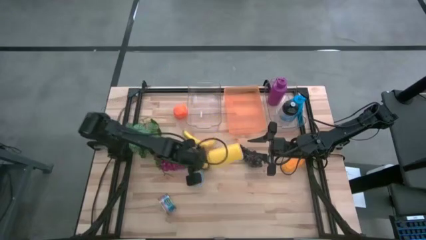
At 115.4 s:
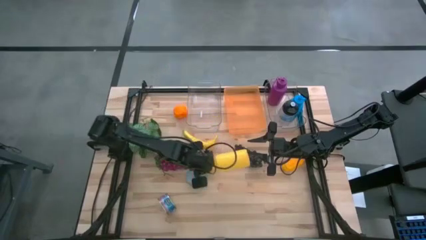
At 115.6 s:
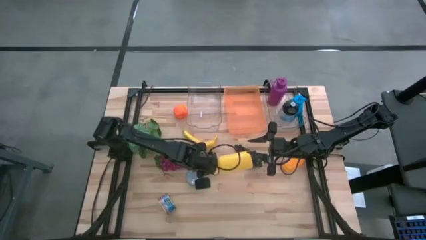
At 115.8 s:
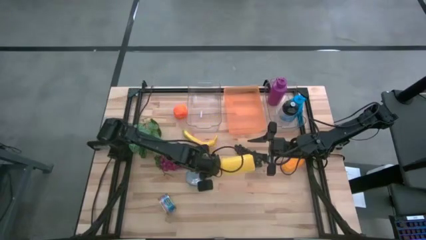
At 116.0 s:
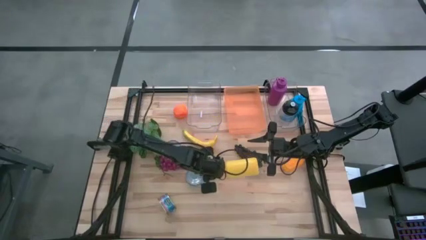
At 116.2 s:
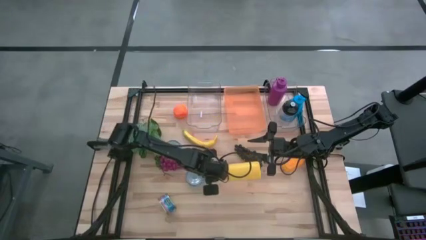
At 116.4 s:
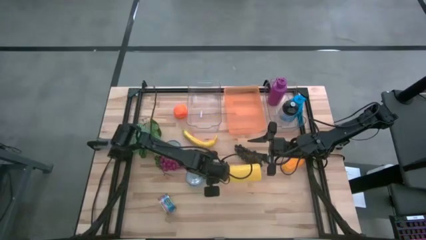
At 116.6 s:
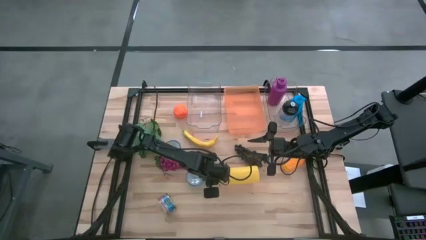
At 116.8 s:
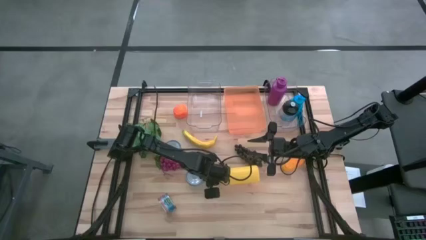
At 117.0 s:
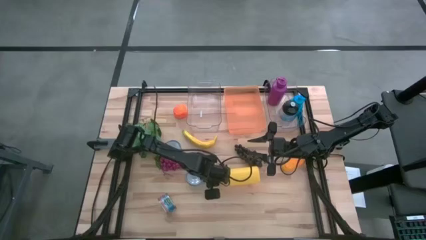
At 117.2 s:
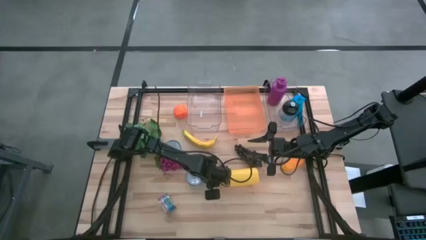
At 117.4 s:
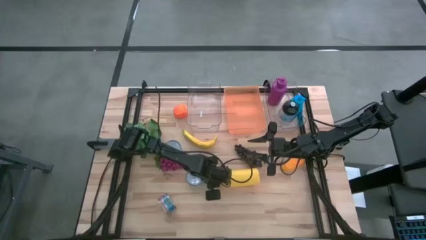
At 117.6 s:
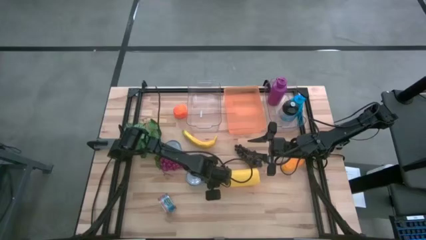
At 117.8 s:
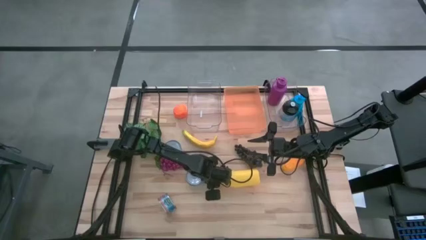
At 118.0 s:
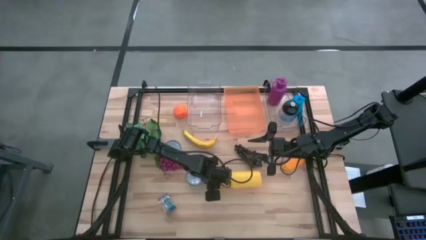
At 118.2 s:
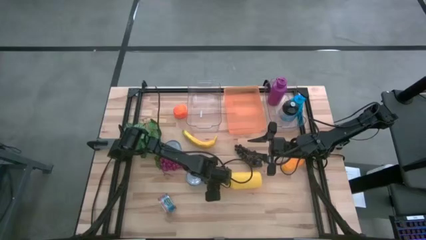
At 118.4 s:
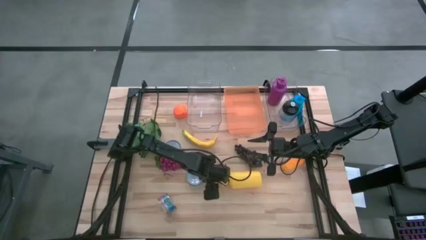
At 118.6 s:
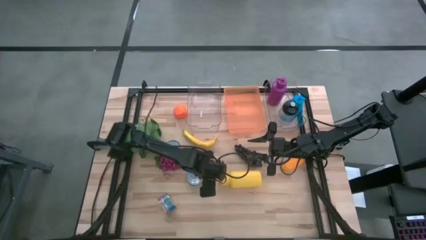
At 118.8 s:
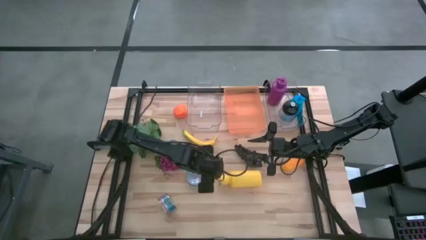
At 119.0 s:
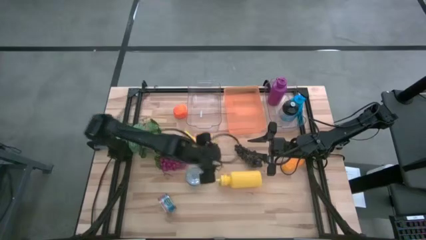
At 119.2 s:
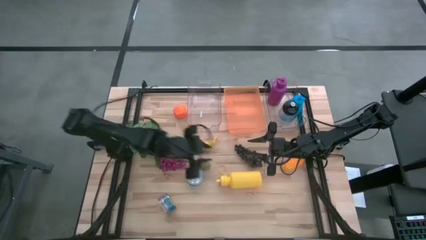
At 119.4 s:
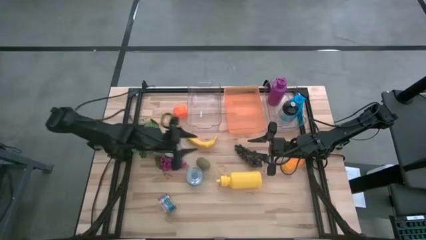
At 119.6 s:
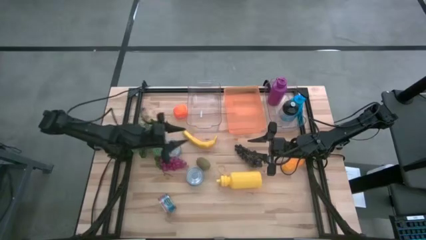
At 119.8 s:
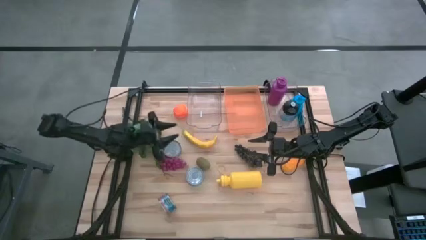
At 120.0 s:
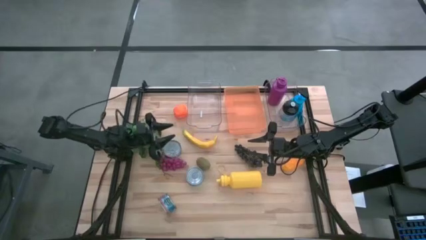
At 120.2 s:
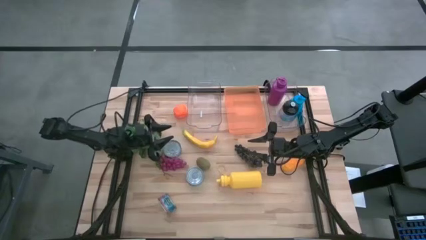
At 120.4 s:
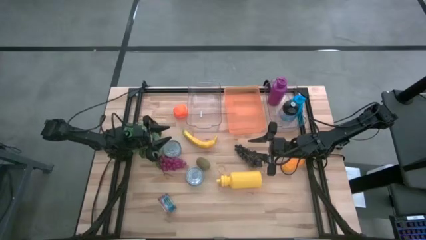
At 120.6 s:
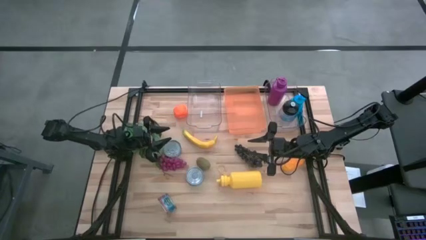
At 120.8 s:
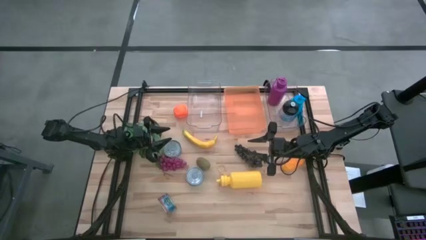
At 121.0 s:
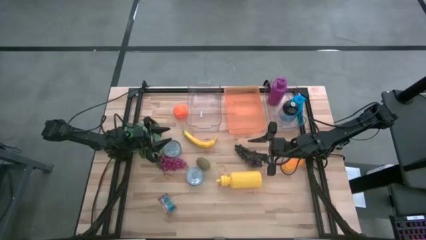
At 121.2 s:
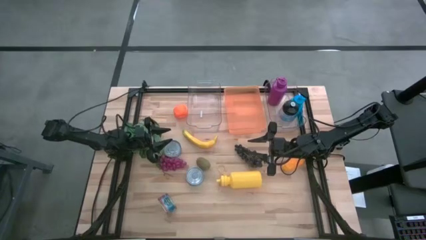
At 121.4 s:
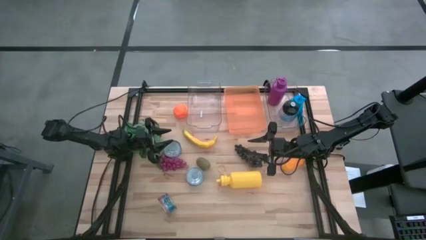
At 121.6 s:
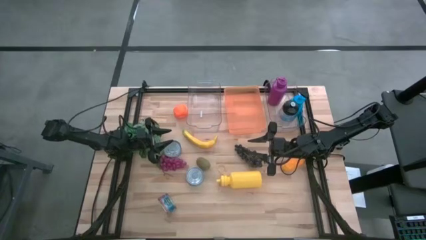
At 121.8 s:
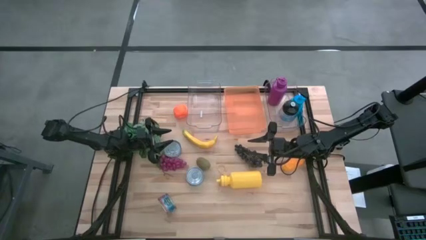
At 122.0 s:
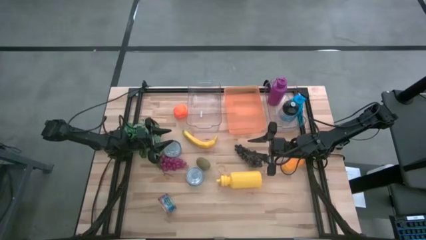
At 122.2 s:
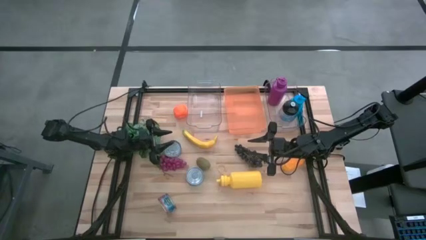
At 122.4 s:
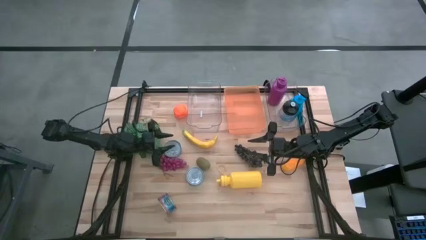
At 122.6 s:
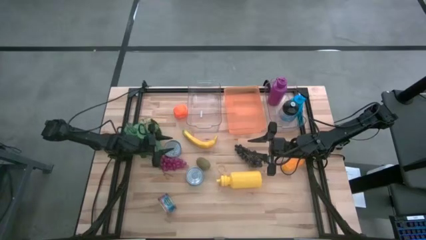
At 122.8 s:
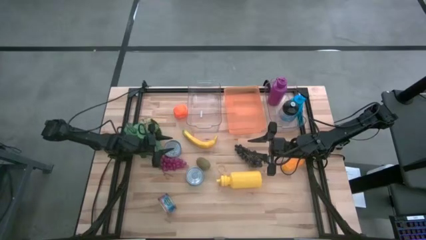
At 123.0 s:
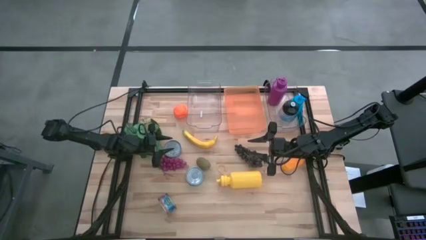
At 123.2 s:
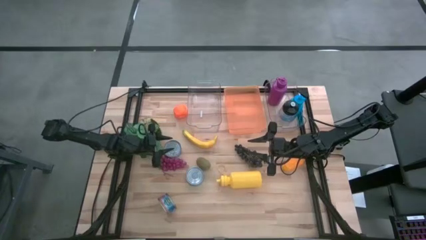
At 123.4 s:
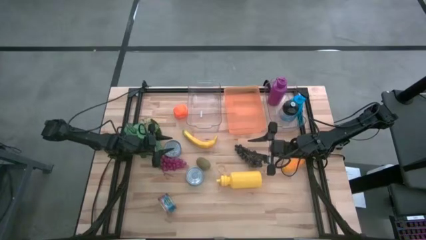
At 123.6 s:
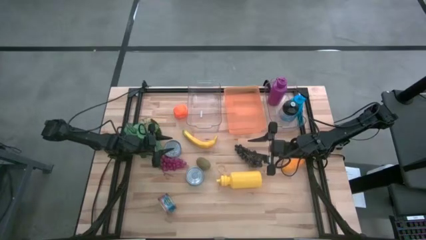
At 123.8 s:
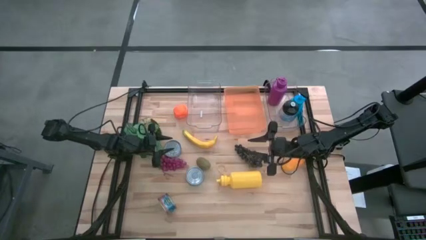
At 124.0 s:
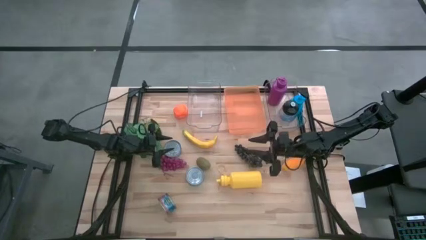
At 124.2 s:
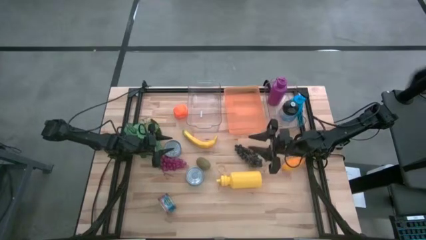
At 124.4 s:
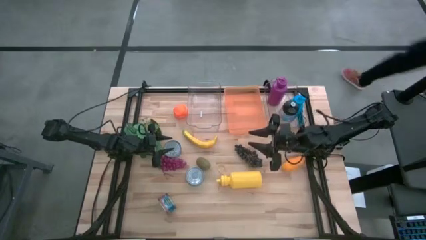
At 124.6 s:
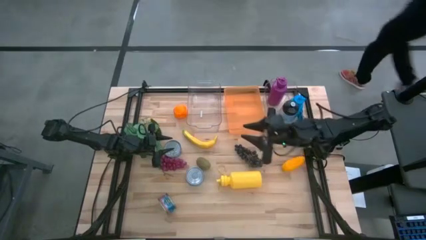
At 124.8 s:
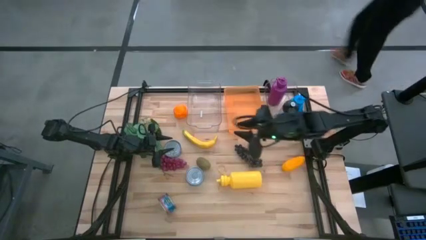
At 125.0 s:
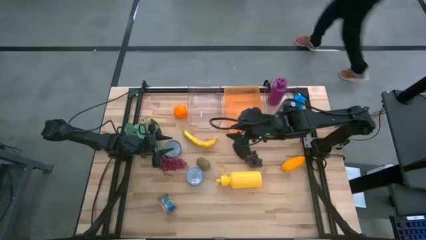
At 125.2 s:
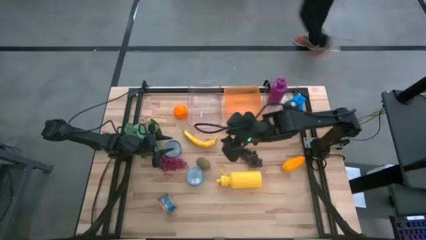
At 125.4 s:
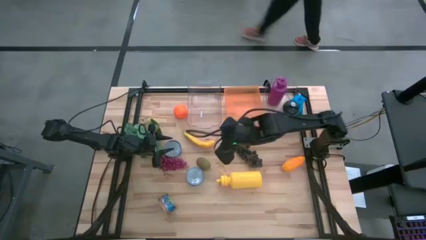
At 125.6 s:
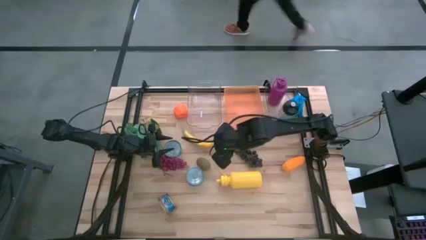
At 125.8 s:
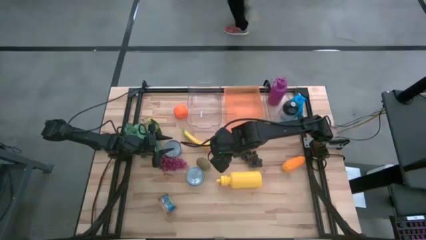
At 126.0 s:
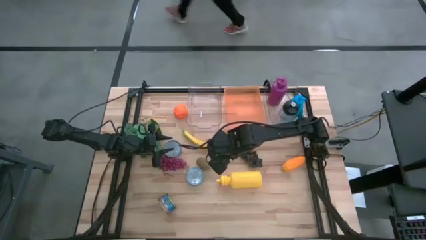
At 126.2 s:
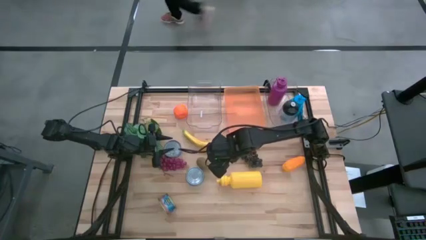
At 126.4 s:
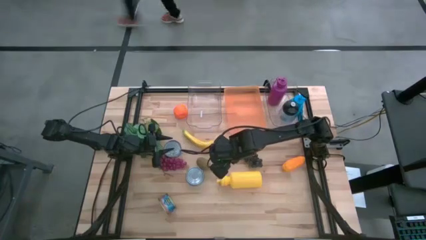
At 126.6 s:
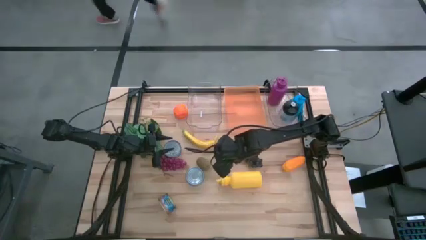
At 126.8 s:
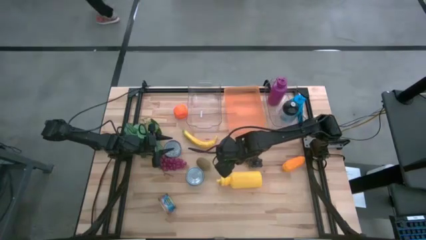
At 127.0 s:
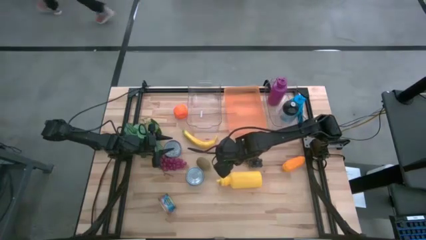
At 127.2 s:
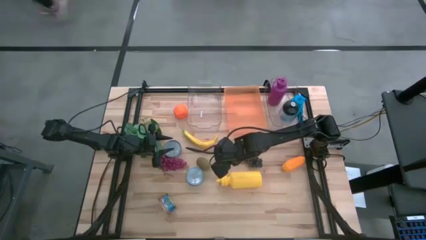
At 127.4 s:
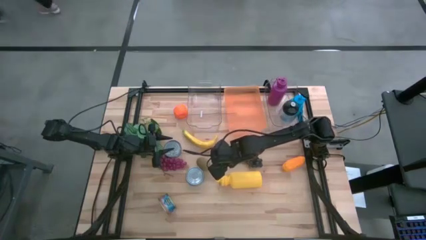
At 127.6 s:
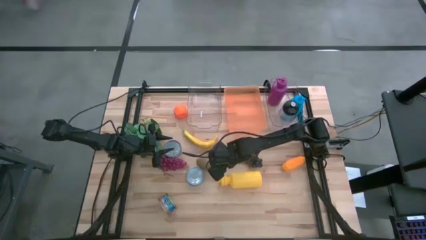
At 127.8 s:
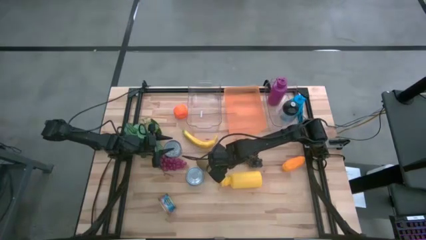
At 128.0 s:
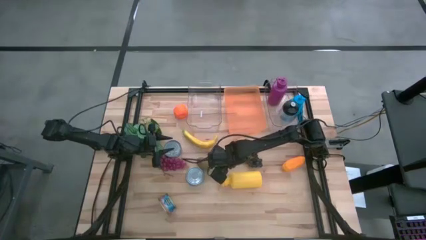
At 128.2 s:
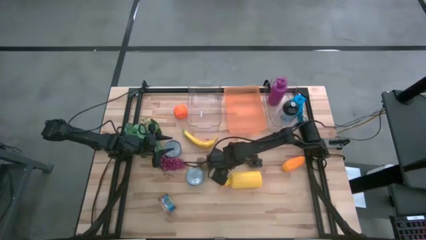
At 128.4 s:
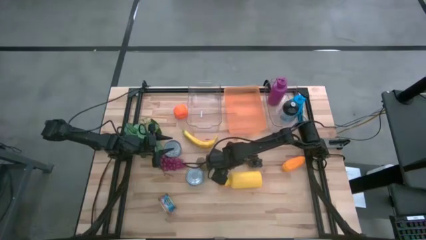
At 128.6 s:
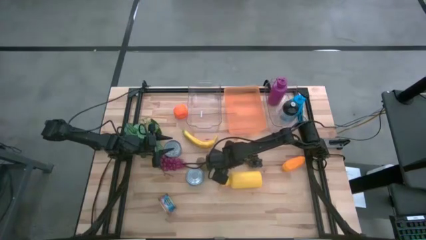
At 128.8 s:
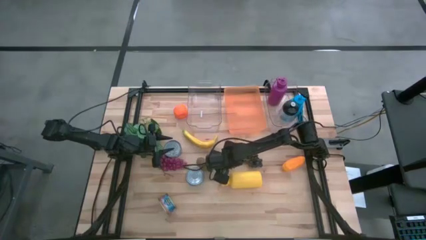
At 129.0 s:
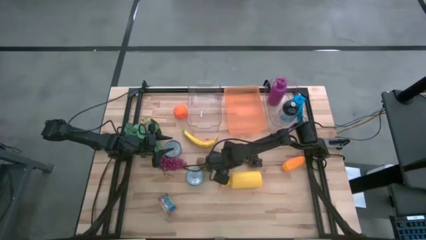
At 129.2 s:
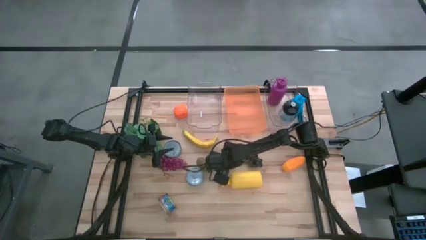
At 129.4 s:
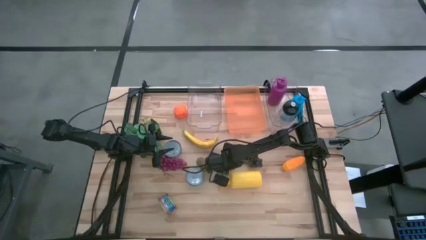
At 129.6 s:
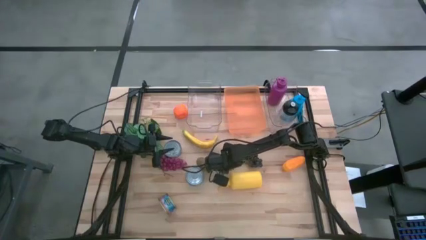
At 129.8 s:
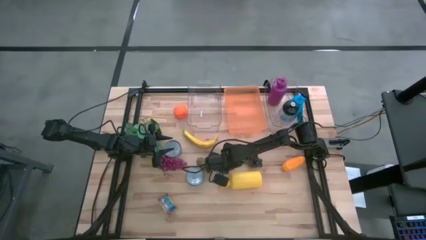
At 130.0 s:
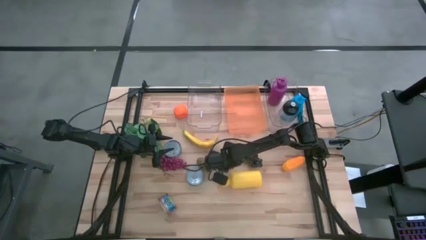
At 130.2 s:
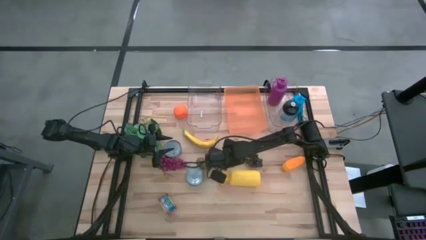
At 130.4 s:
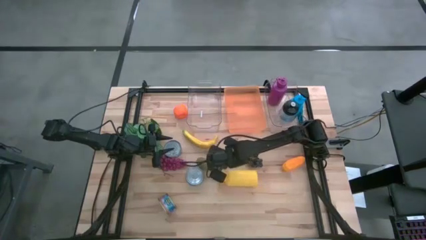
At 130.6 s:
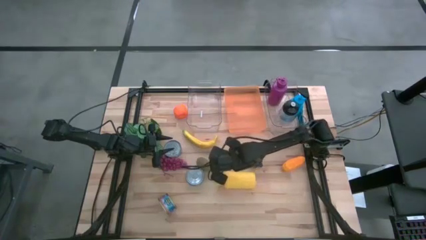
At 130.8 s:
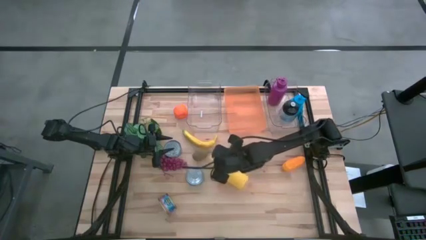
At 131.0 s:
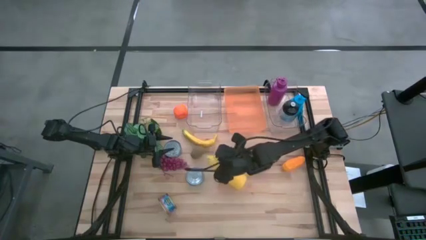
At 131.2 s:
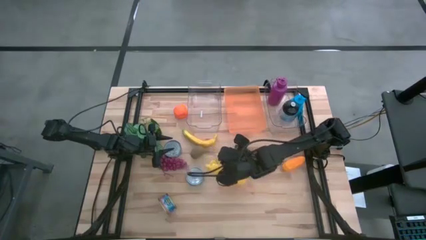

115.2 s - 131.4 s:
Task: Pick & Place Food Item
Put the yellow water bottle into the right transparent bin
